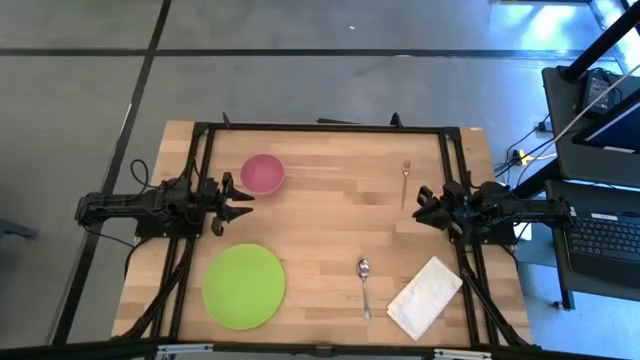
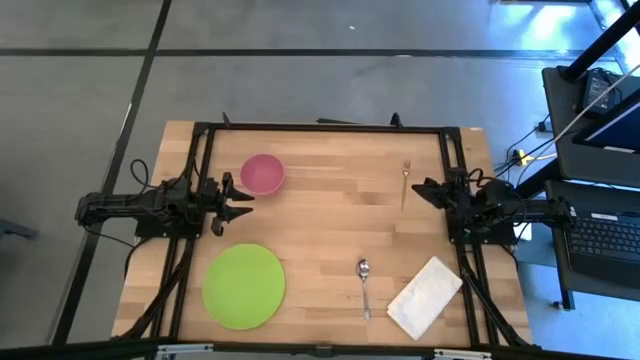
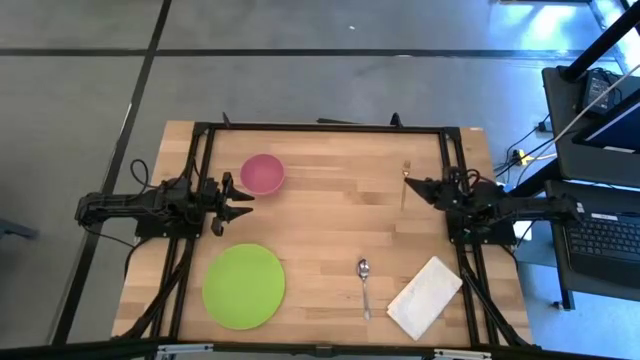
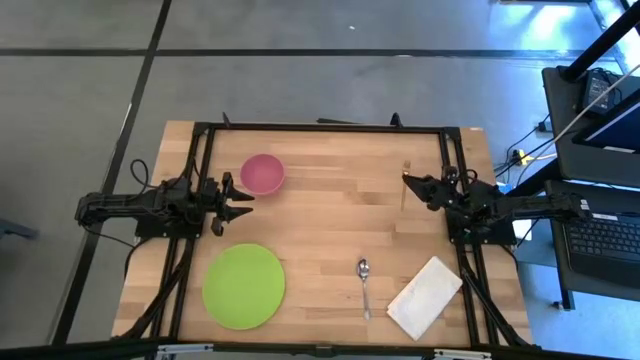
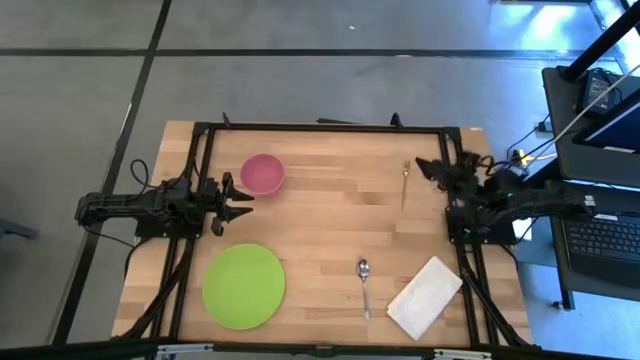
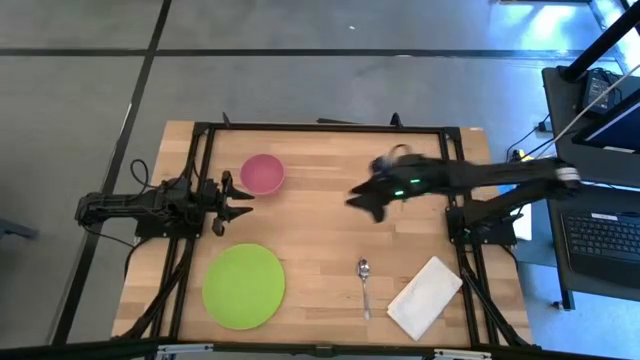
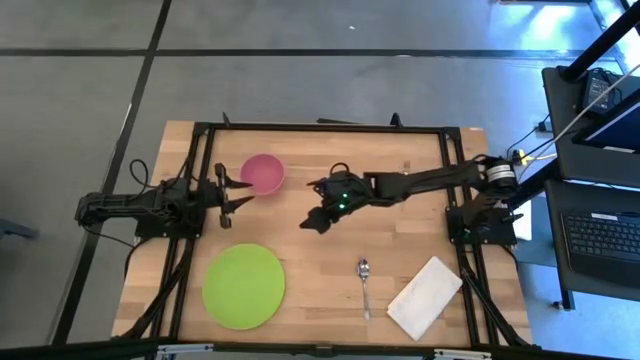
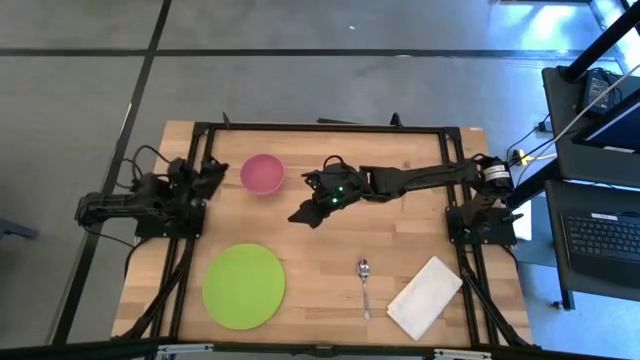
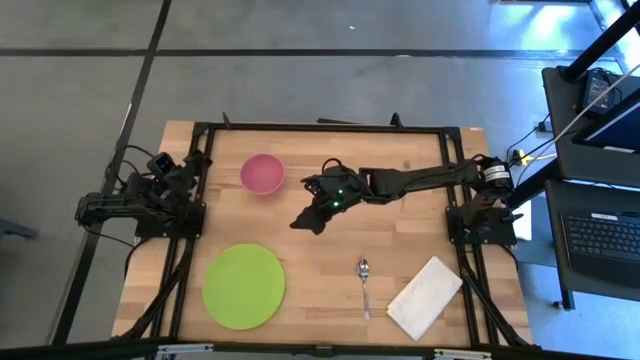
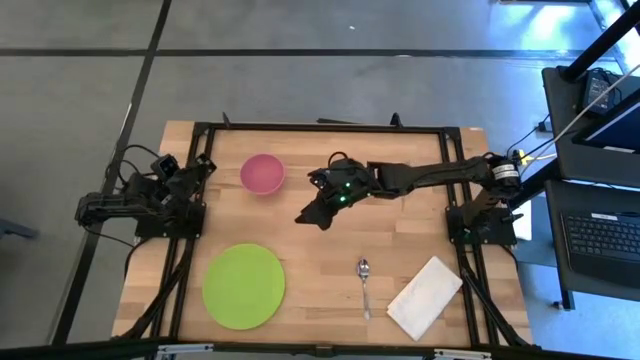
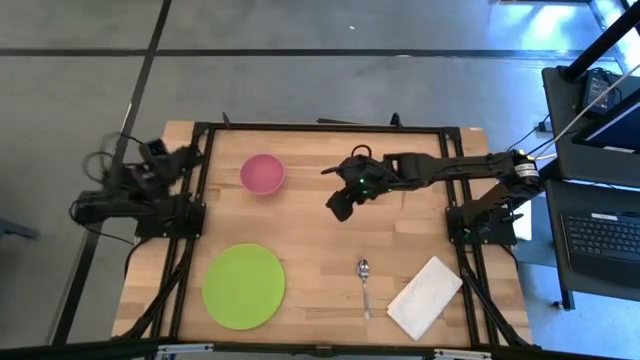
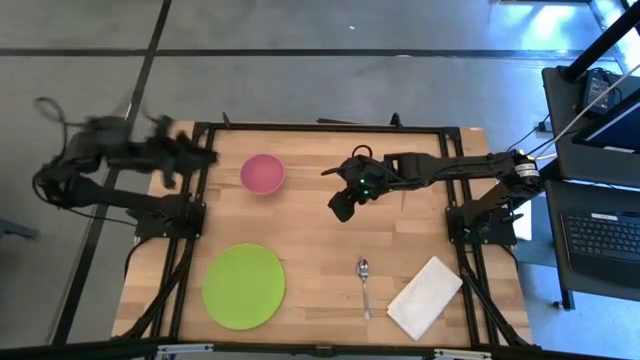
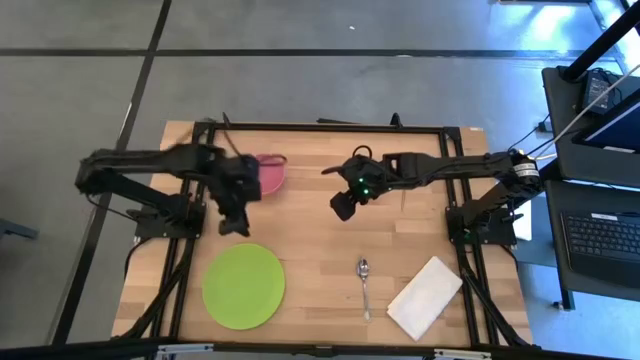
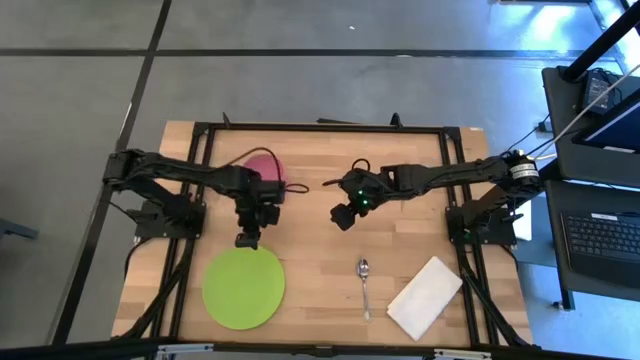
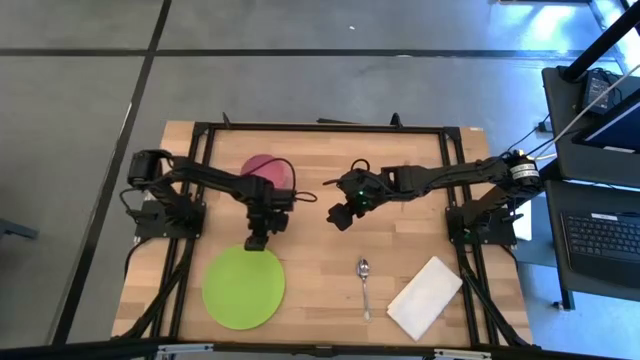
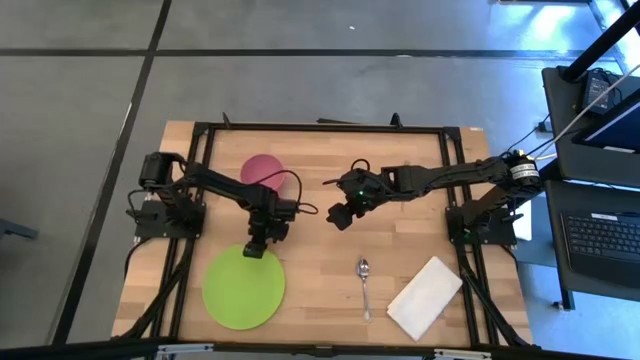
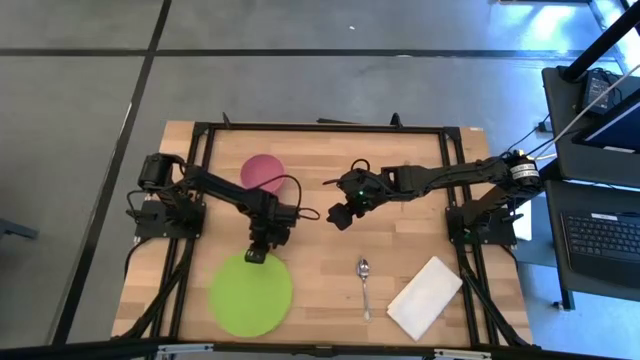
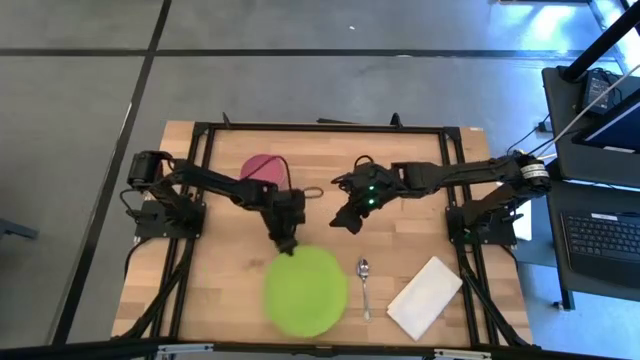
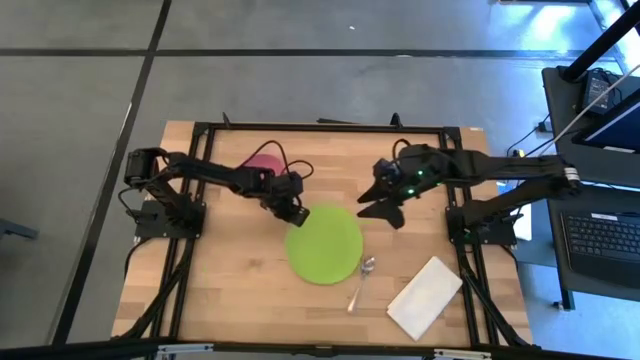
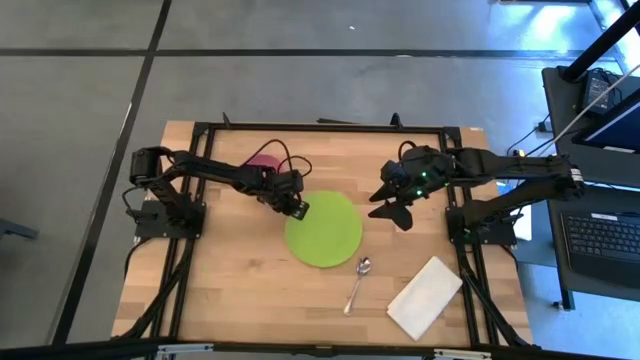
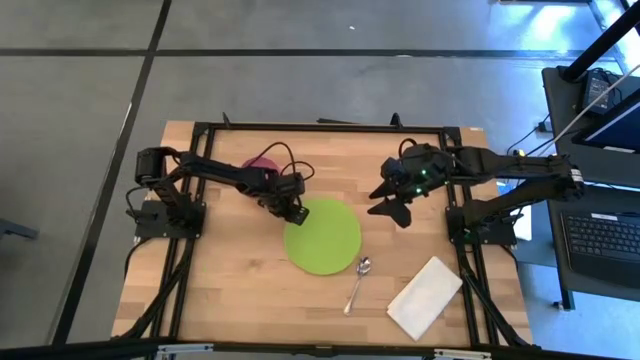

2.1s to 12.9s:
Task: Set table place
Move the green plate to the center of the table

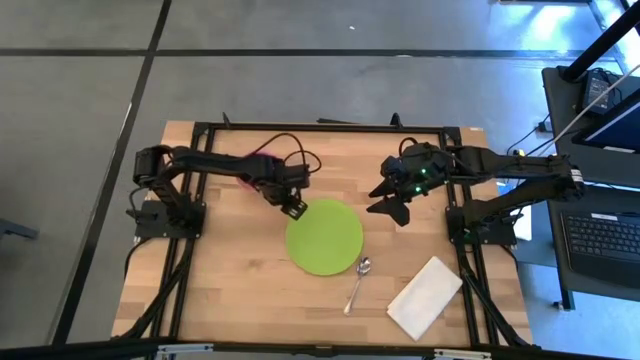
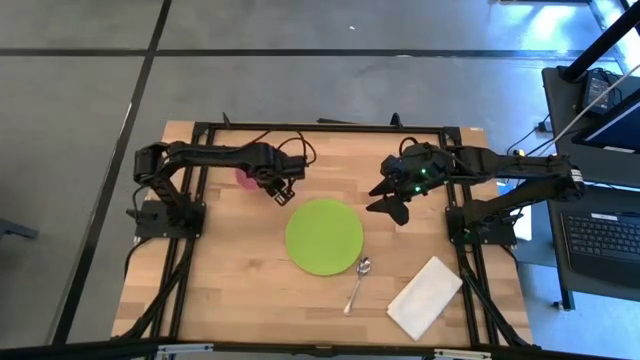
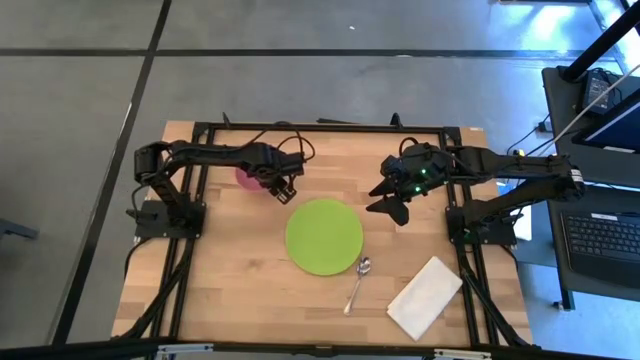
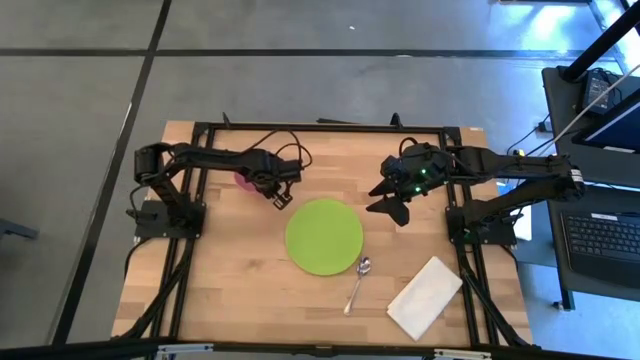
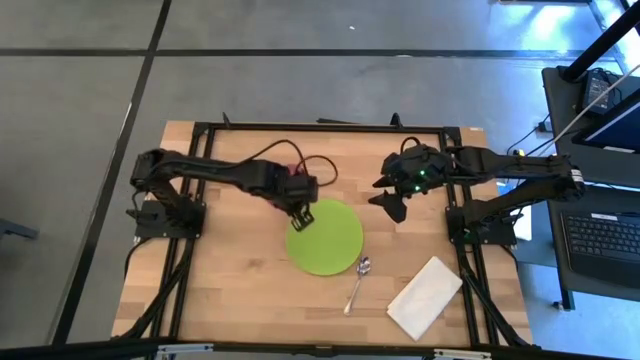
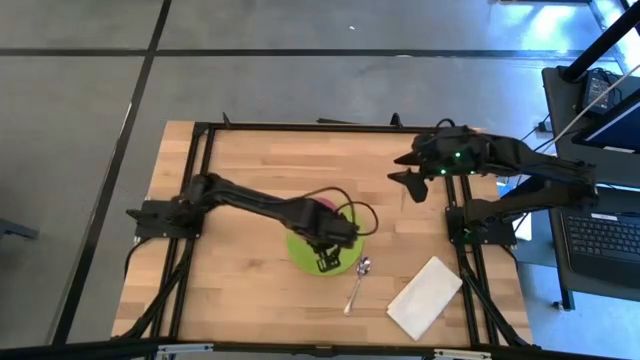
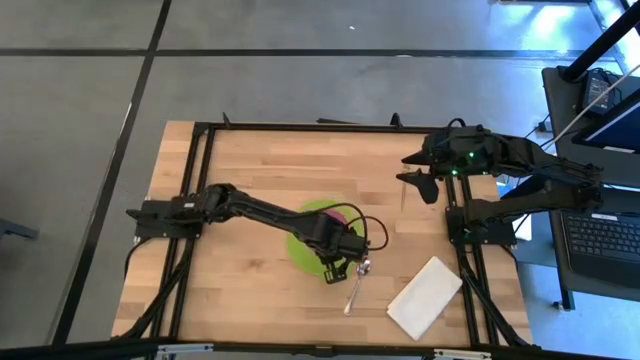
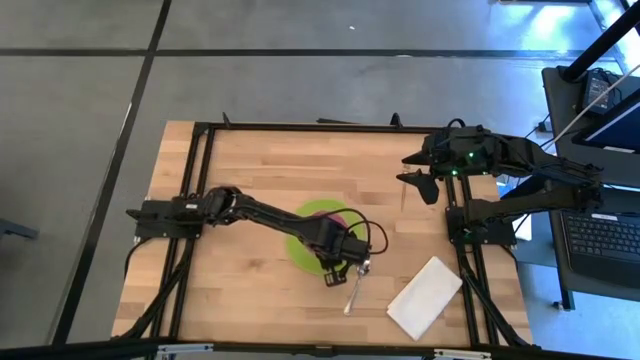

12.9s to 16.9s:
Put the pink bowl on top of the green plate

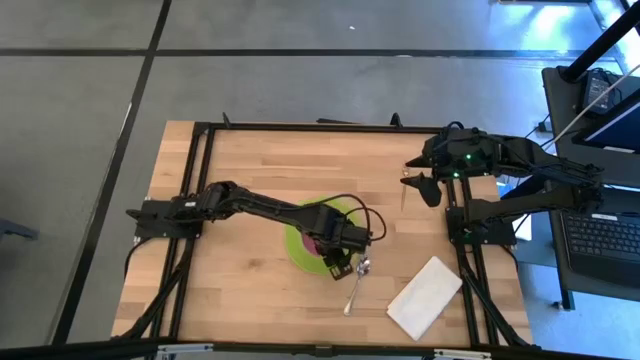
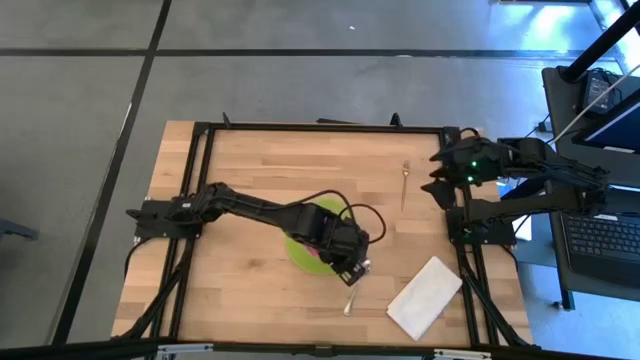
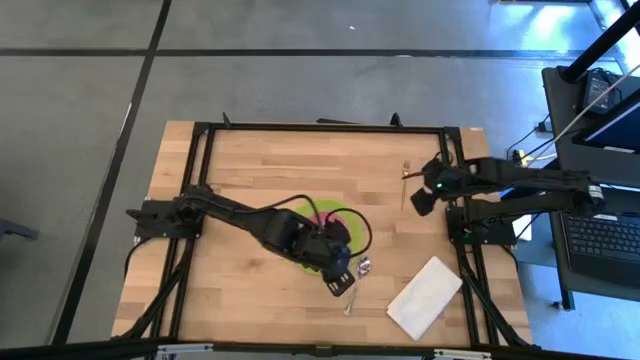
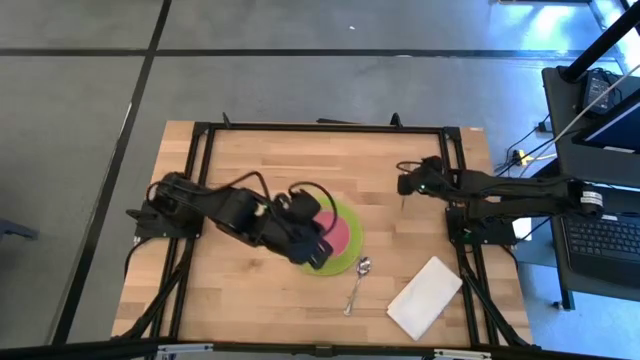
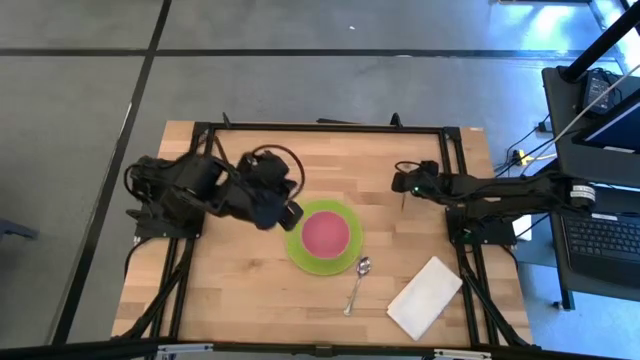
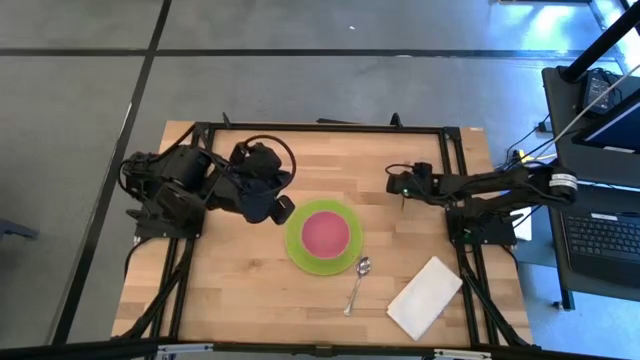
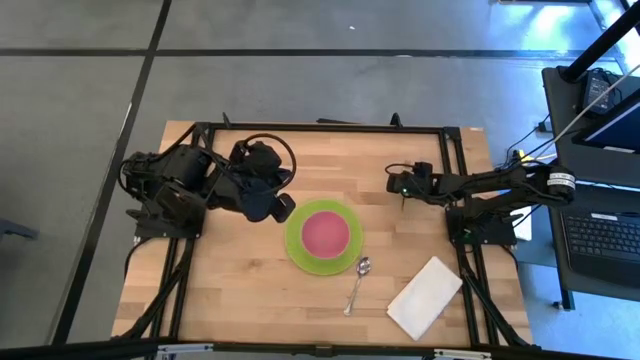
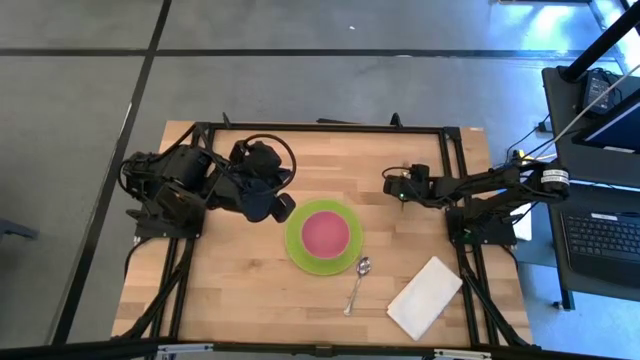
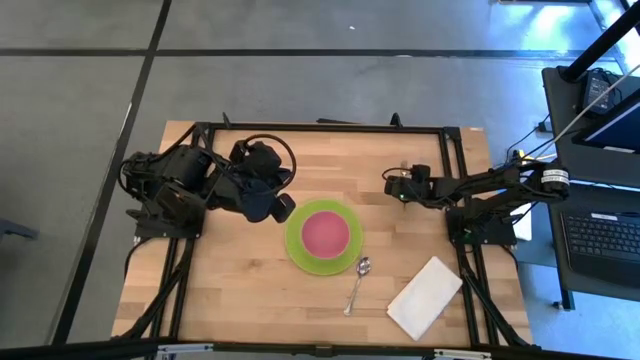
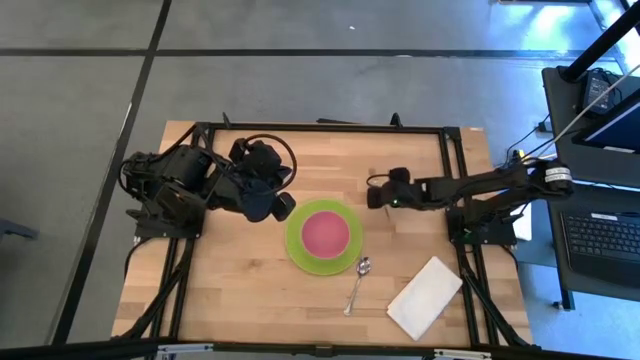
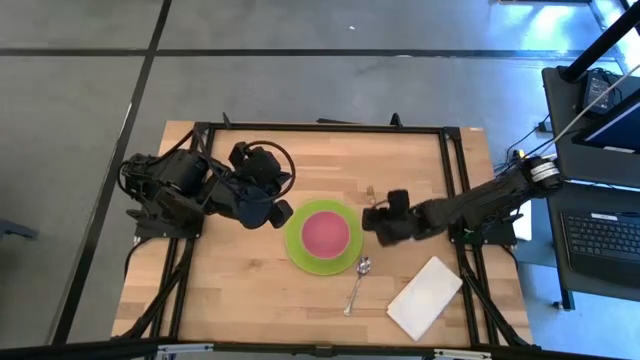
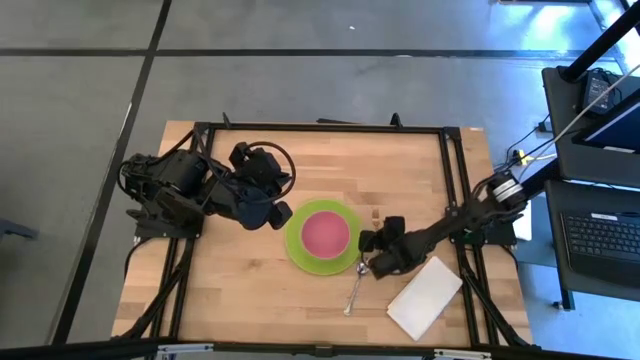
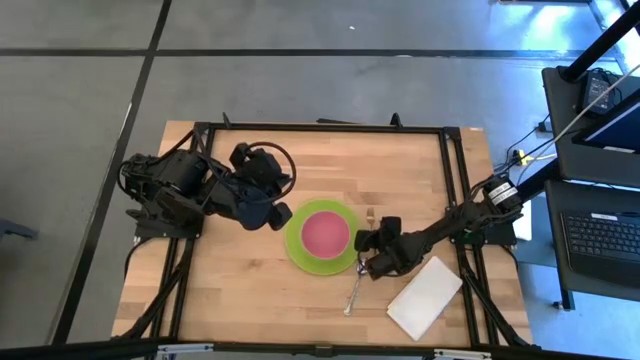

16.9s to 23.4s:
Put the fork on the right side of the green plate on the table
